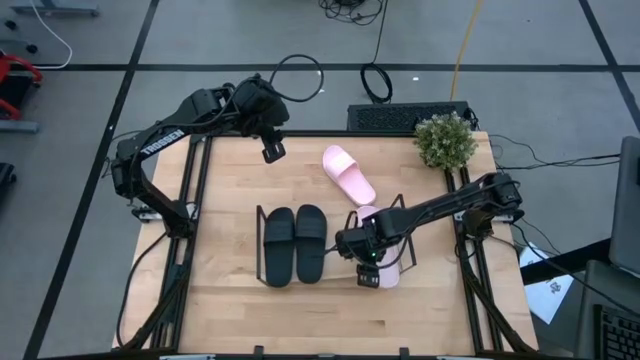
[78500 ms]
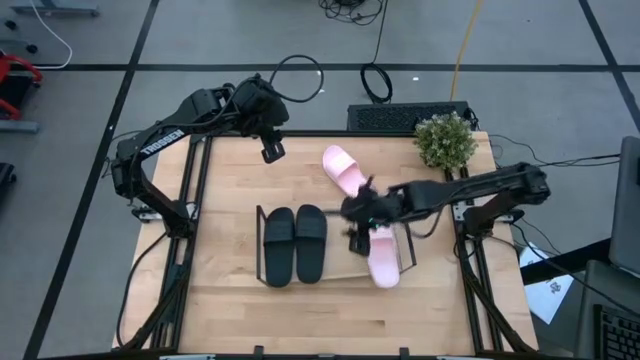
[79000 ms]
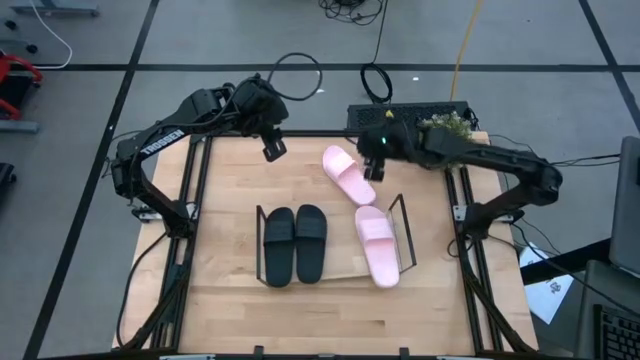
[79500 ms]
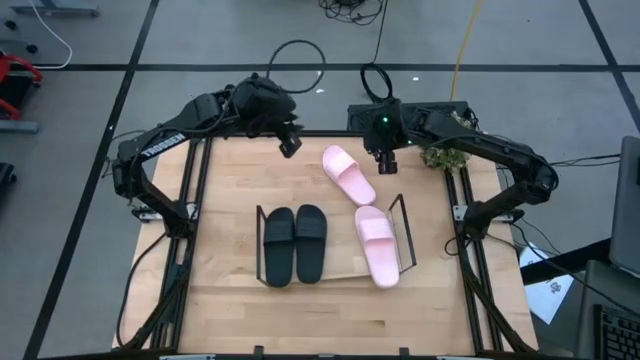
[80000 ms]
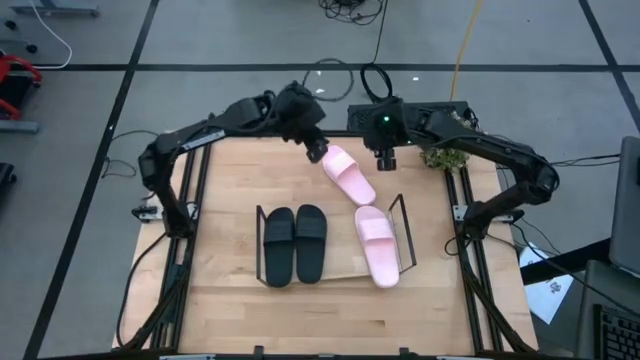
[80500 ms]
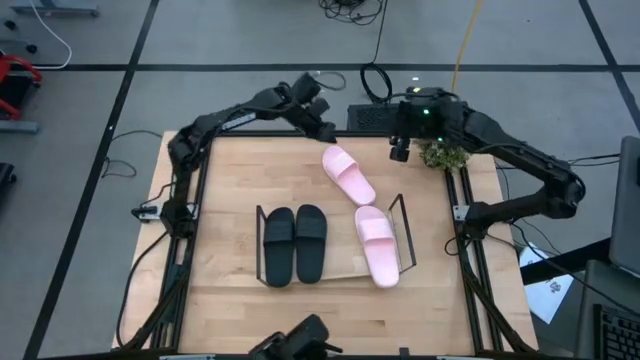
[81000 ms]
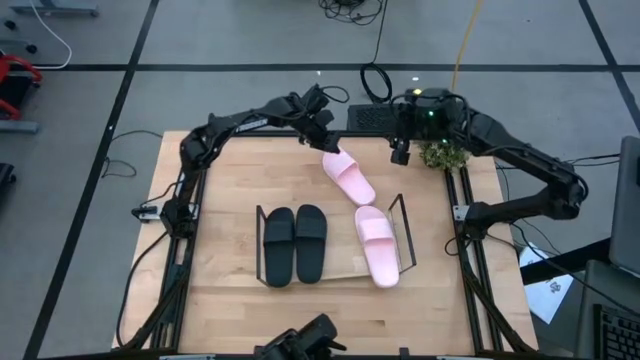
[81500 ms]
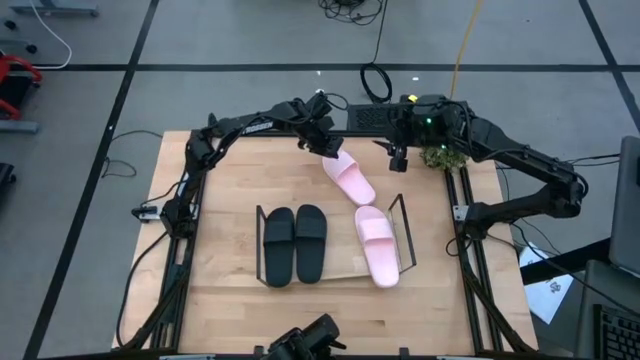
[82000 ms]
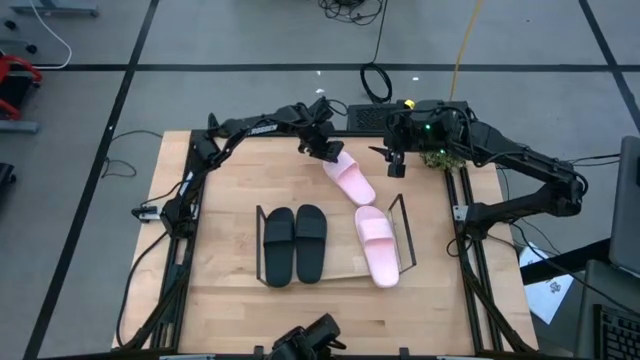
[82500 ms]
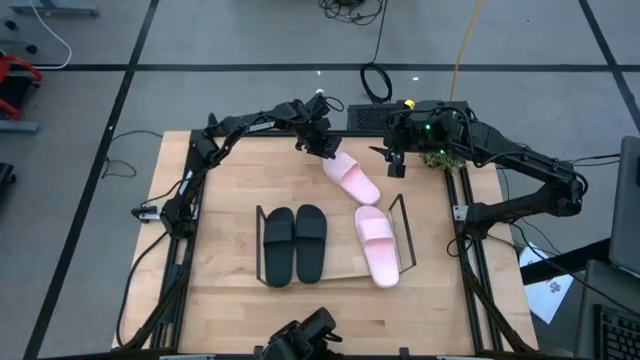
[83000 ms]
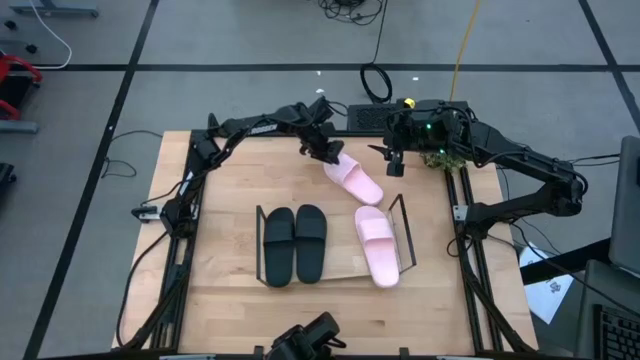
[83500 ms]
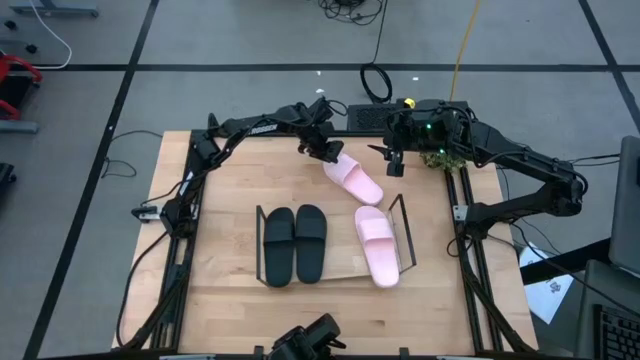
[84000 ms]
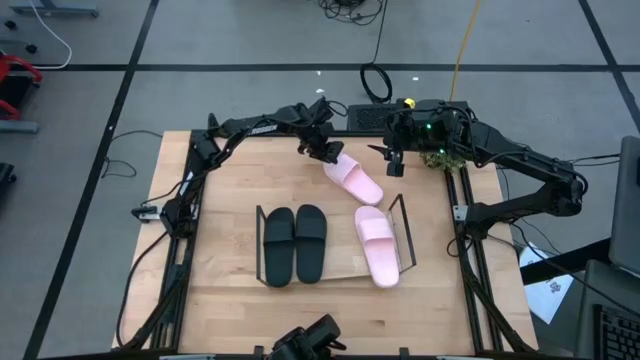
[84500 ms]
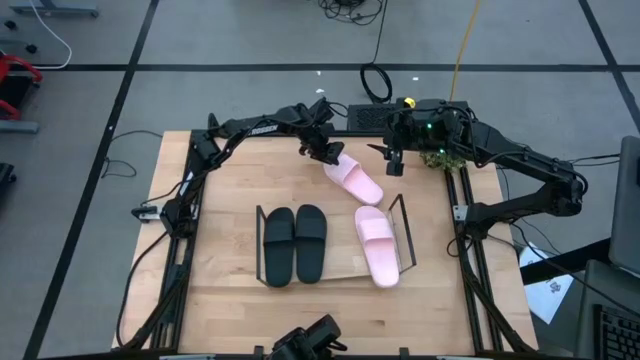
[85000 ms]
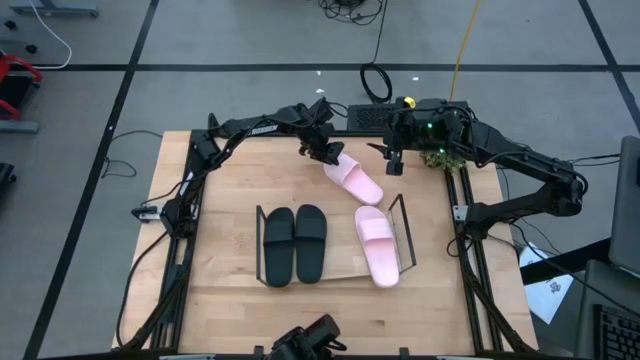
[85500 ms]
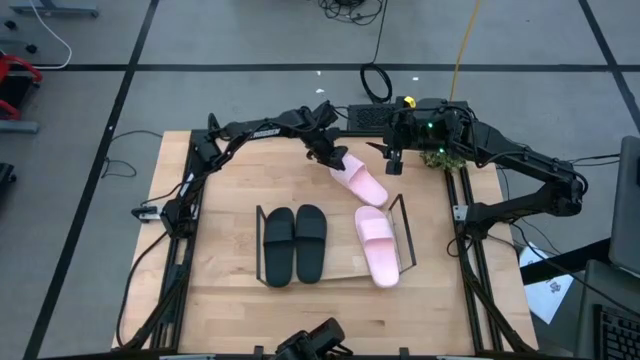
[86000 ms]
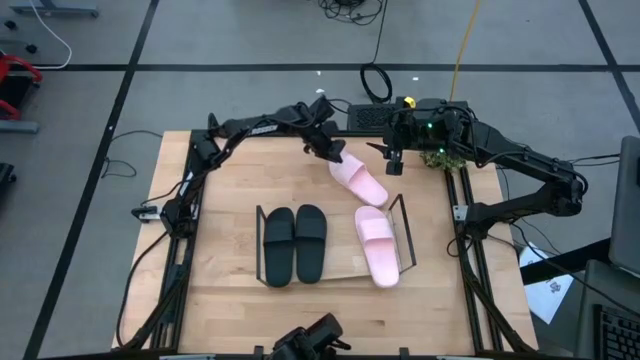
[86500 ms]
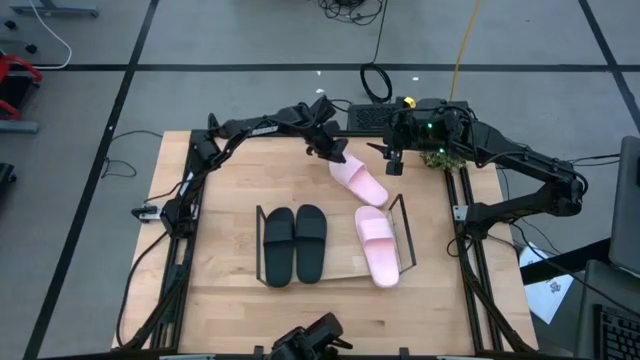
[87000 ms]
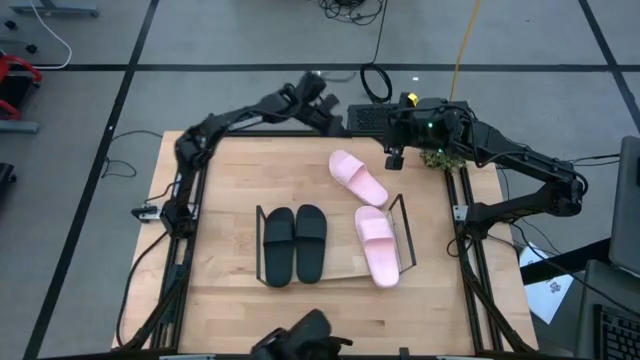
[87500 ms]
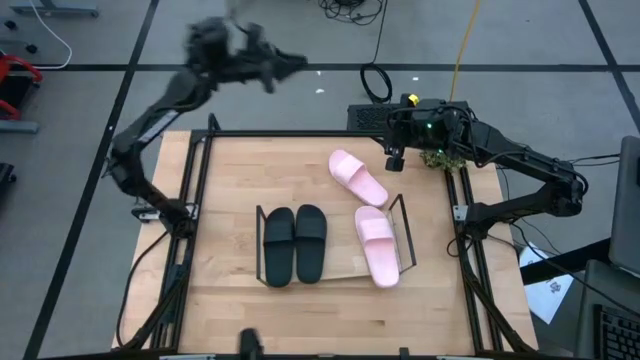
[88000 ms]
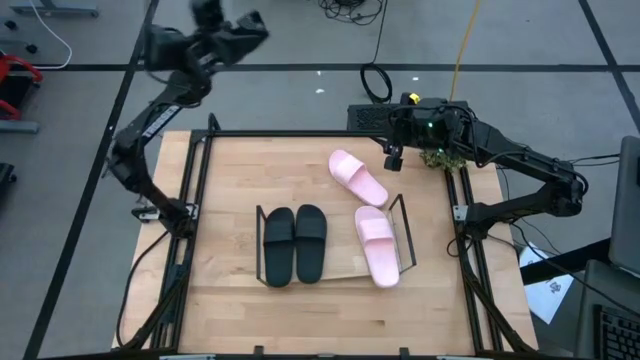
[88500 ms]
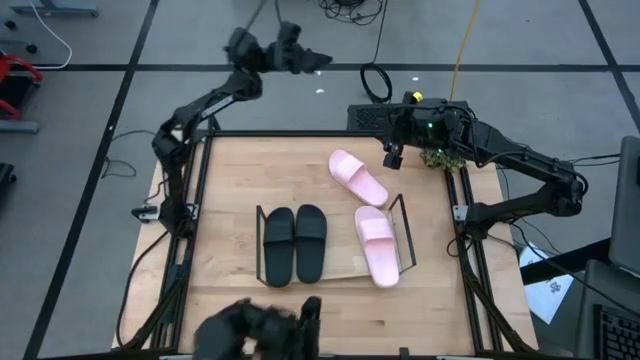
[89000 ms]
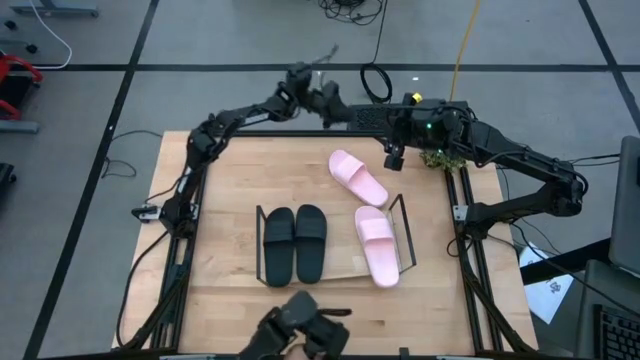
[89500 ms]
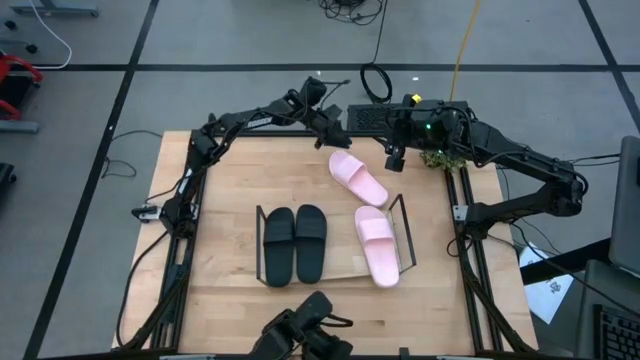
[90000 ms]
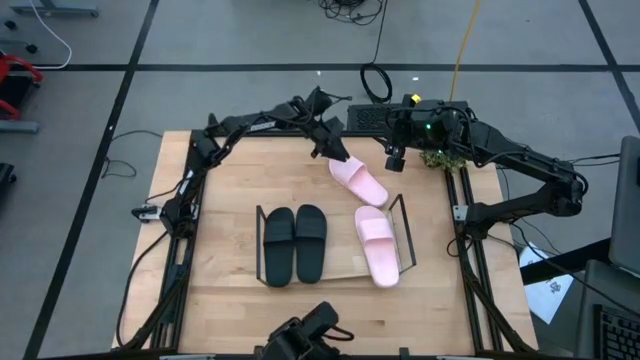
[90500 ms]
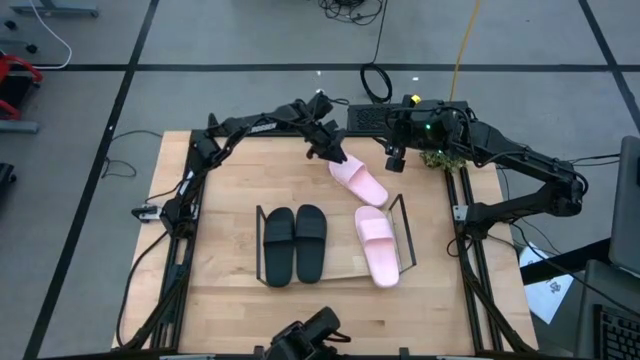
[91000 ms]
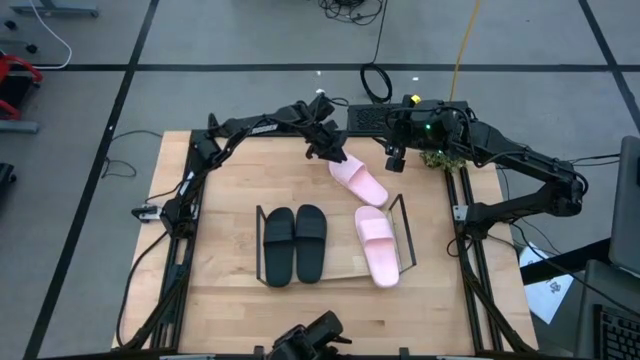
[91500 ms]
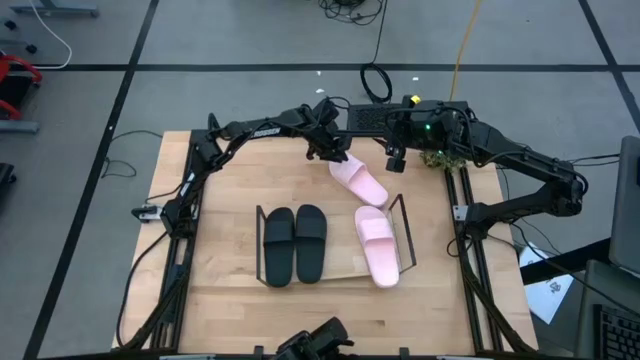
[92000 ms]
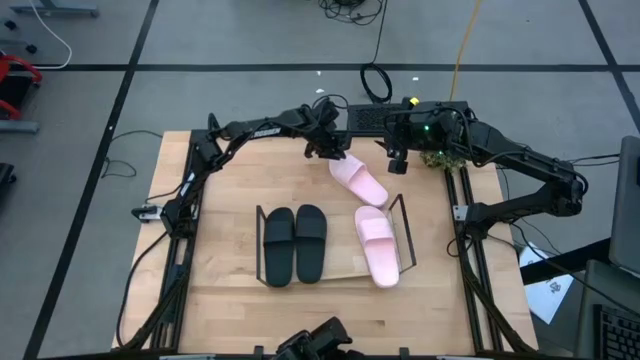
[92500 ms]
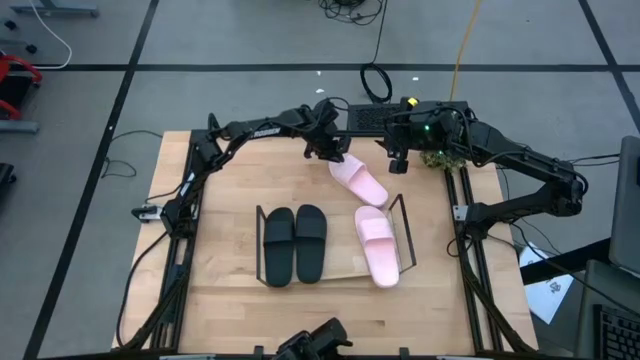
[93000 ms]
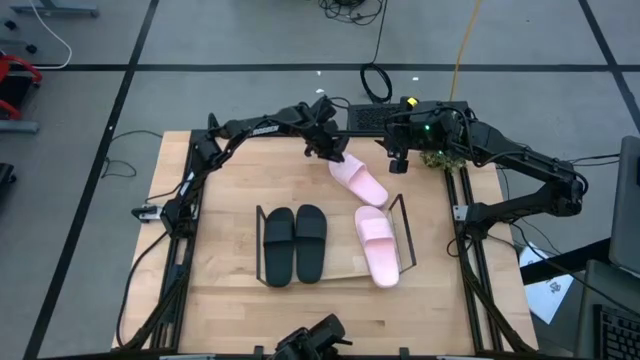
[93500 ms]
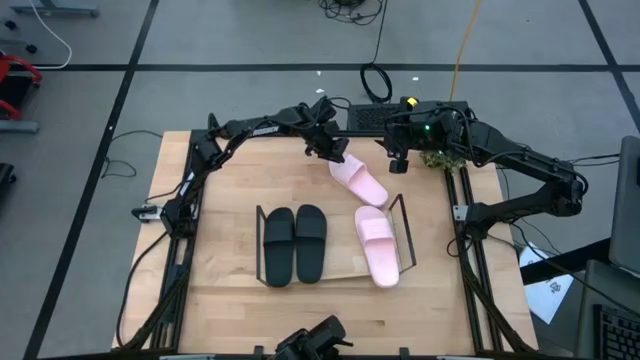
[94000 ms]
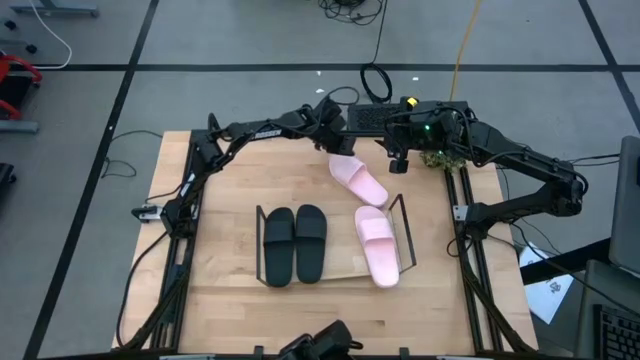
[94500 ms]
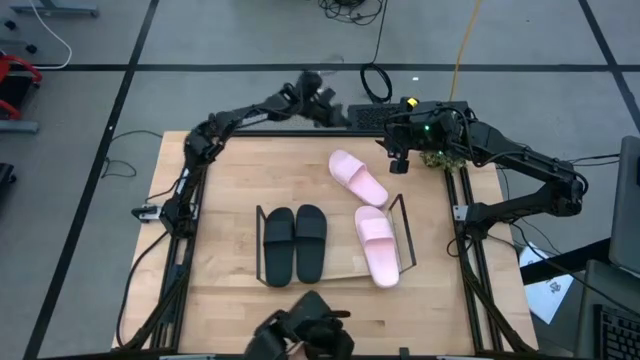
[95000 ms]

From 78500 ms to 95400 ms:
Task: Pick and place slides into the shelf
Put the pink slides on the shelf

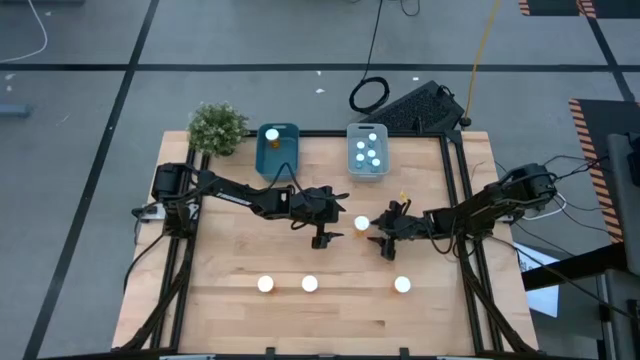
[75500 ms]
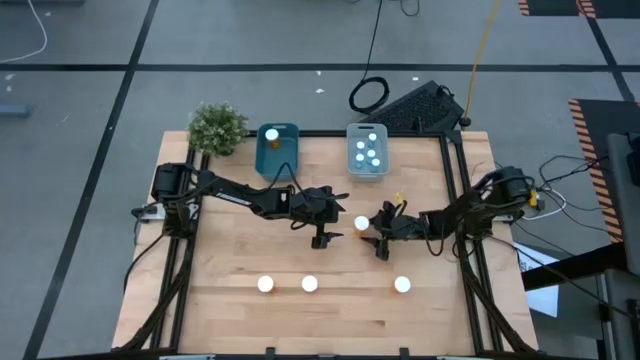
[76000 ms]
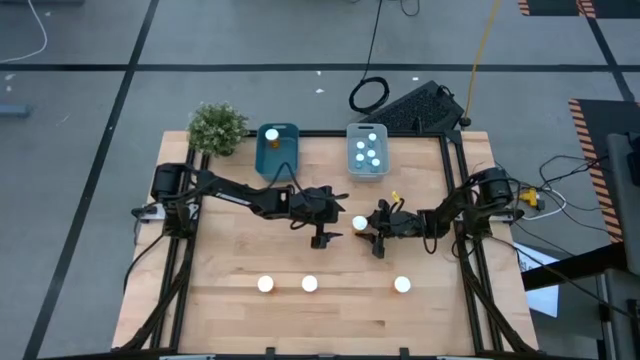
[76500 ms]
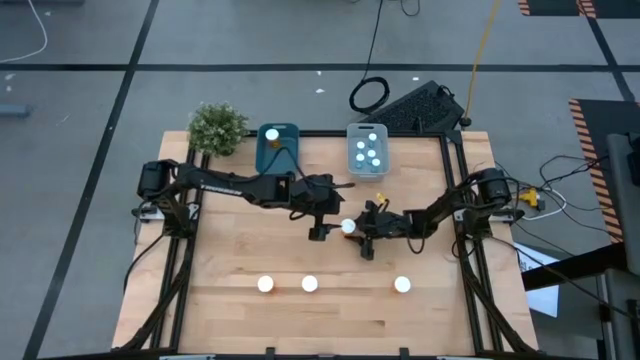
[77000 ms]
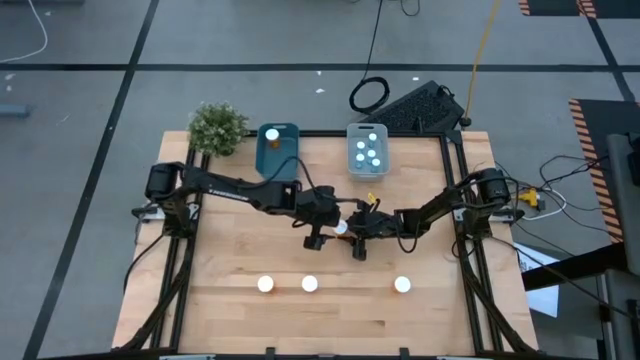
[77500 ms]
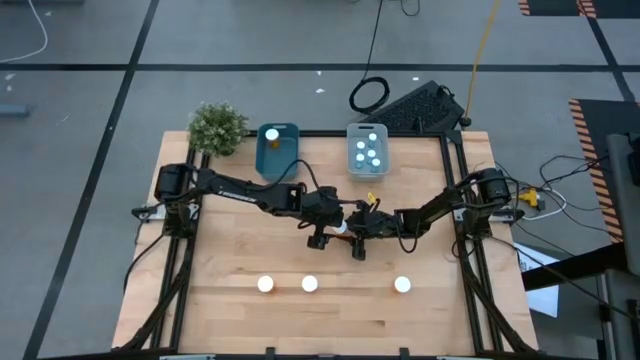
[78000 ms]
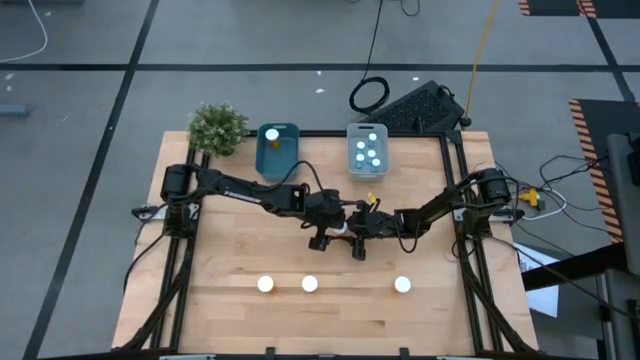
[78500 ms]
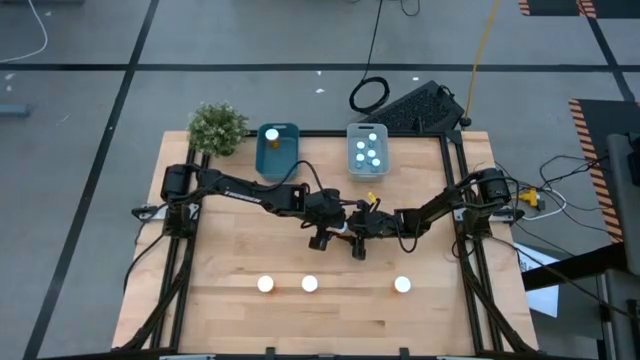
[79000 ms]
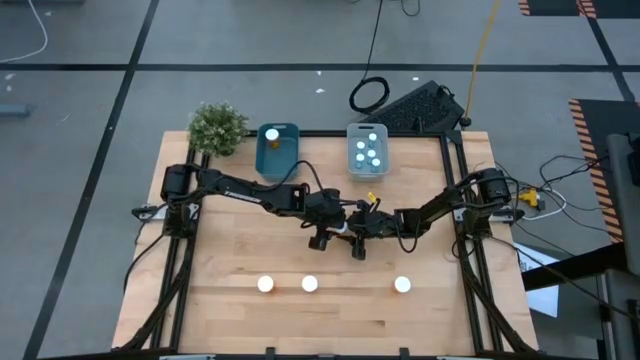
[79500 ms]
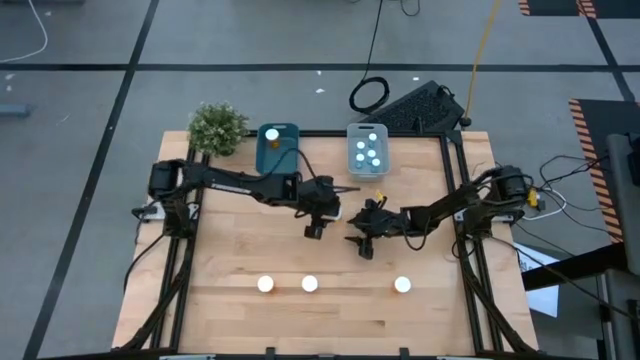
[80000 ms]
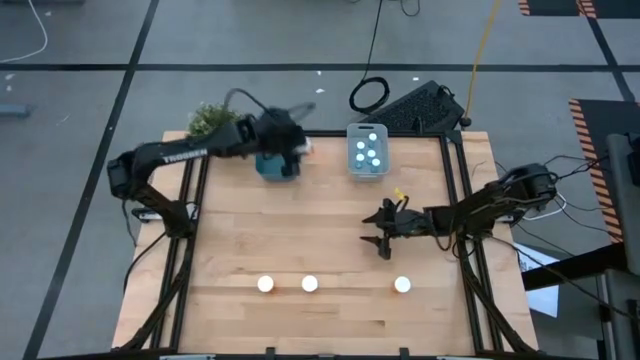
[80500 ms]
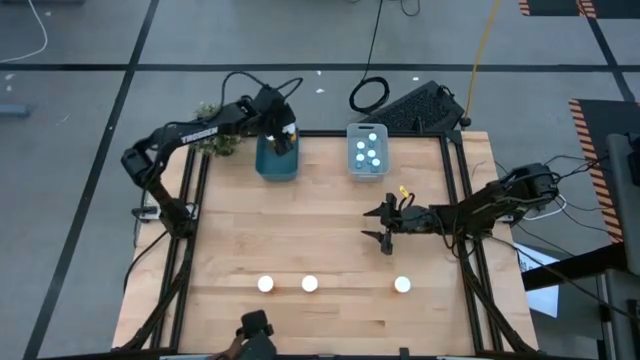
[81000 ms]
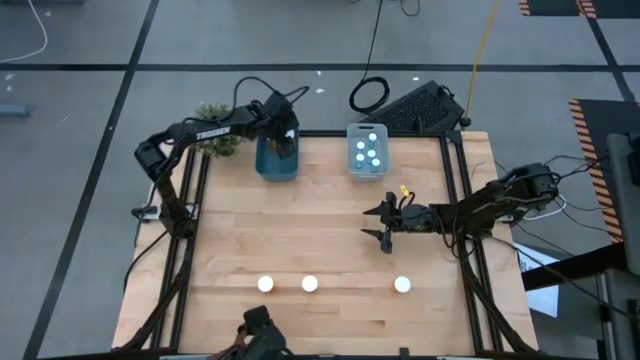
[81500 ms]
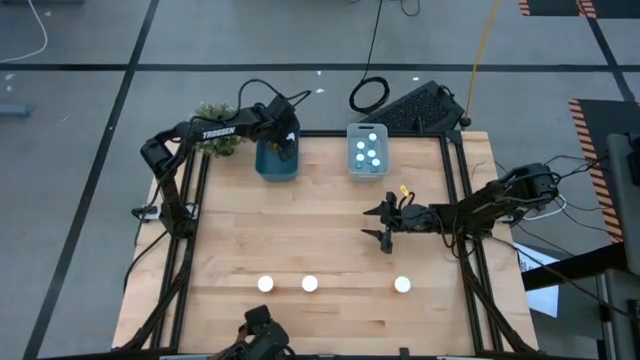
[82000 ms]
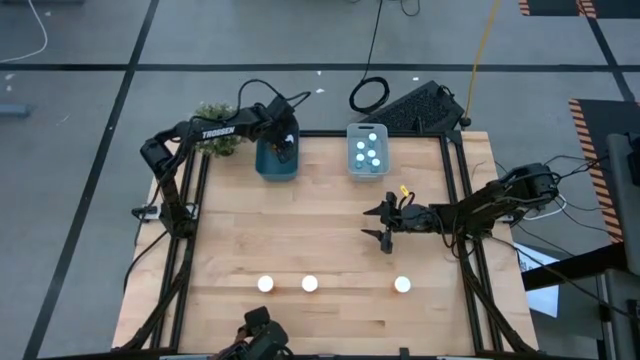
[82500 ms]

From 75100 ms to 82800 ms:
Task: Pick and place medicine bottles into bin by pill shape (circle, oval)
Put the orange pill bottle into the green bin
